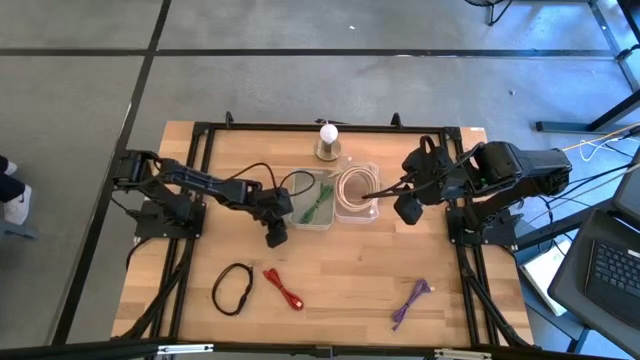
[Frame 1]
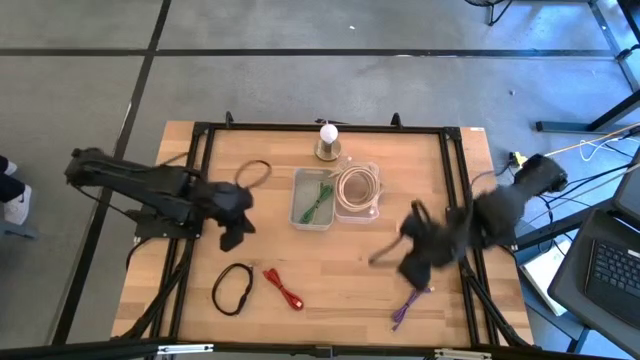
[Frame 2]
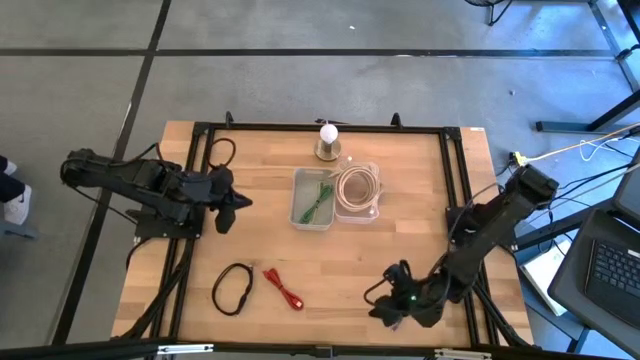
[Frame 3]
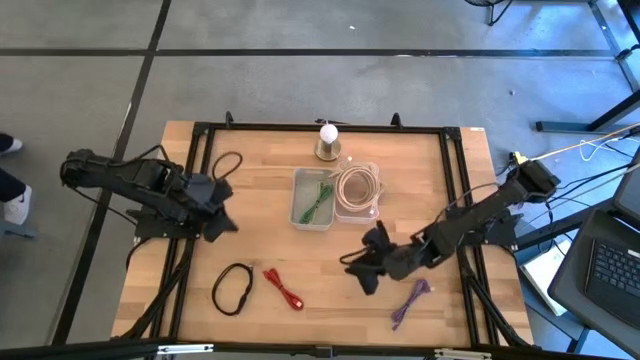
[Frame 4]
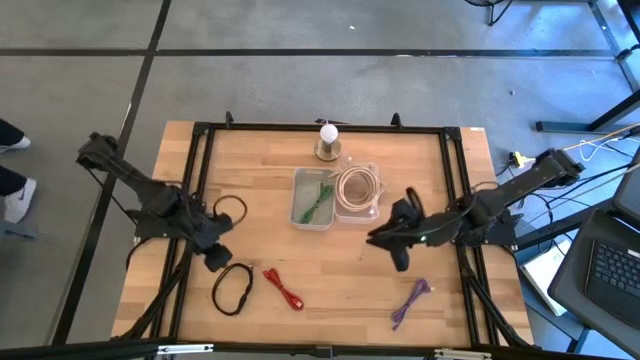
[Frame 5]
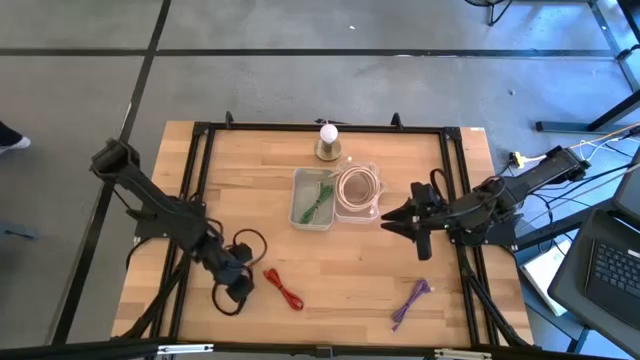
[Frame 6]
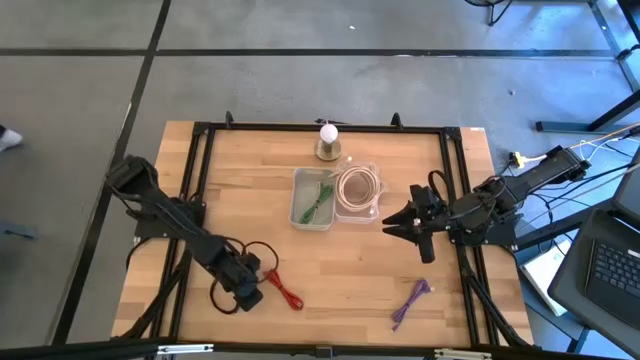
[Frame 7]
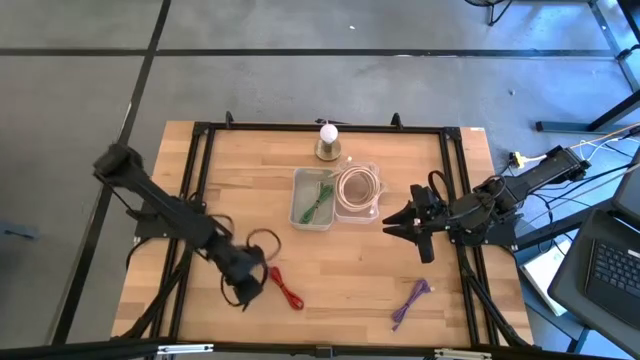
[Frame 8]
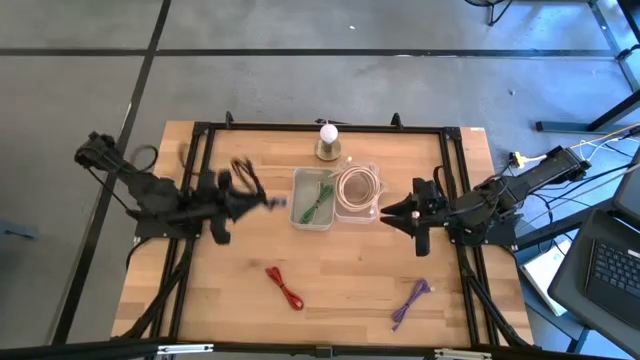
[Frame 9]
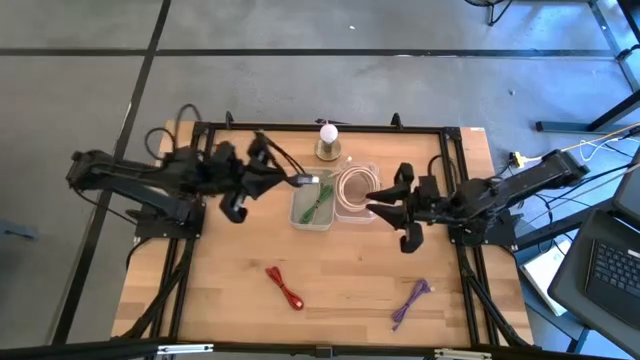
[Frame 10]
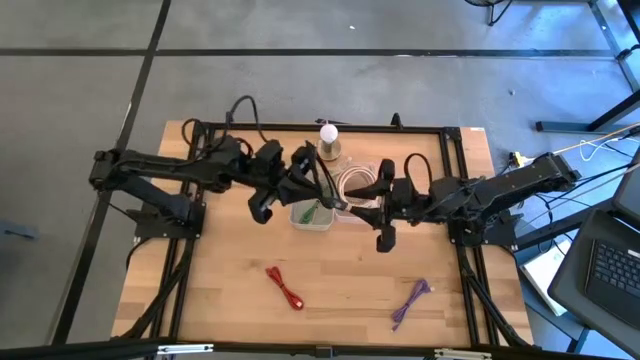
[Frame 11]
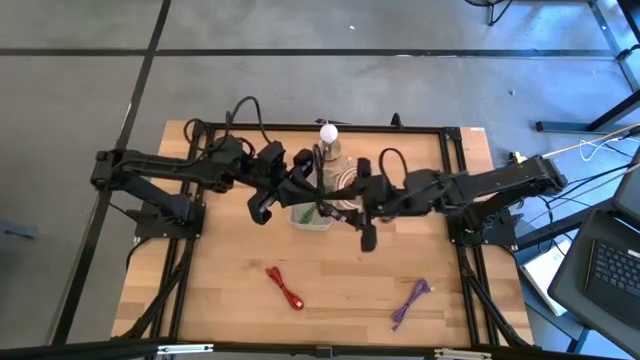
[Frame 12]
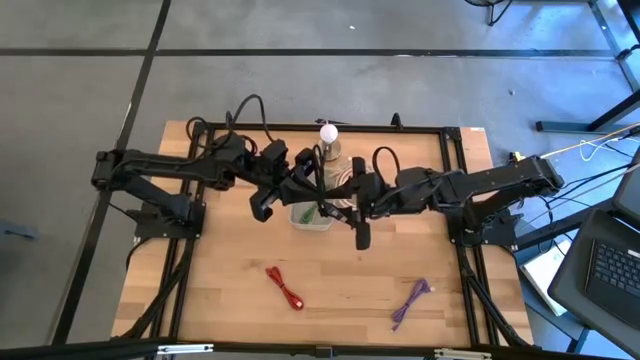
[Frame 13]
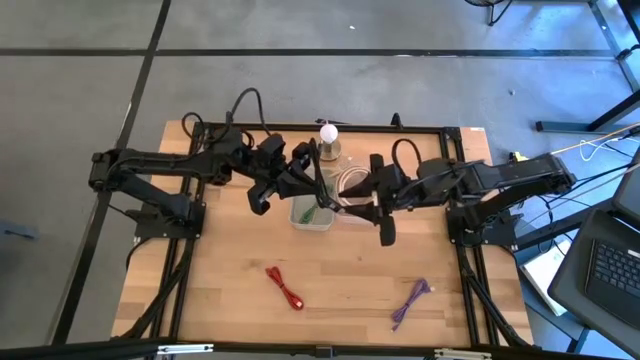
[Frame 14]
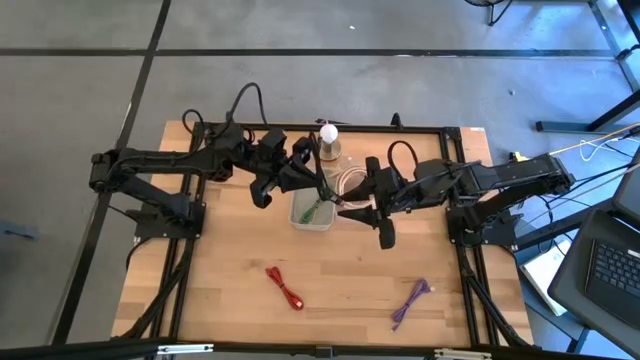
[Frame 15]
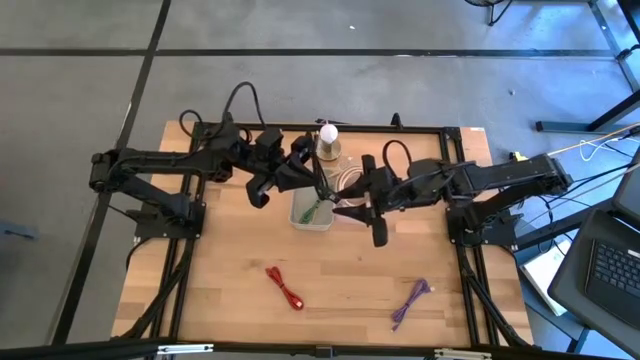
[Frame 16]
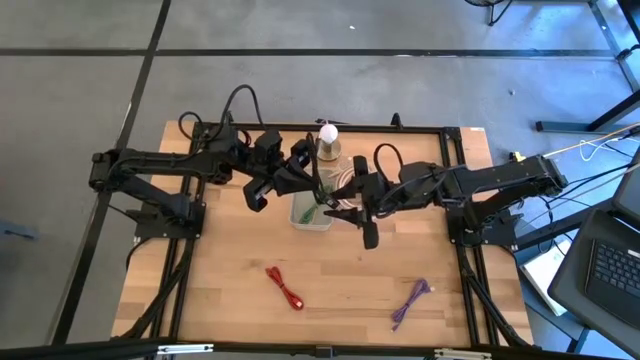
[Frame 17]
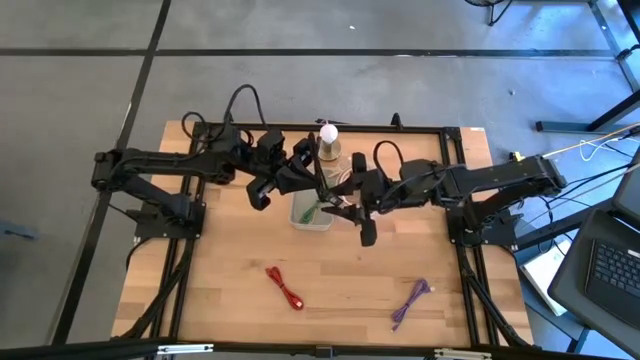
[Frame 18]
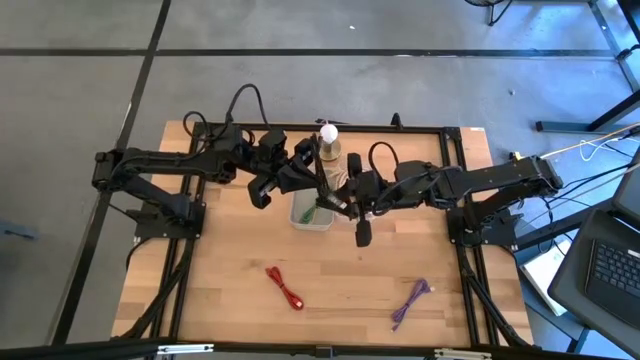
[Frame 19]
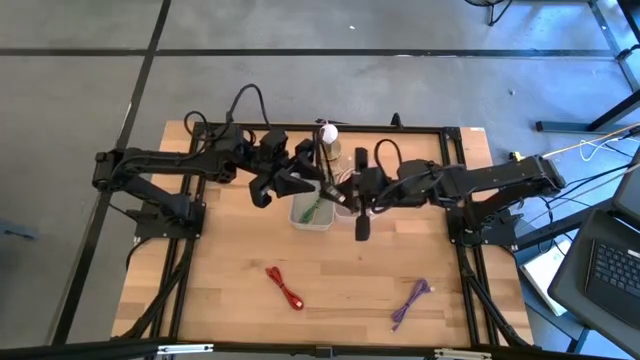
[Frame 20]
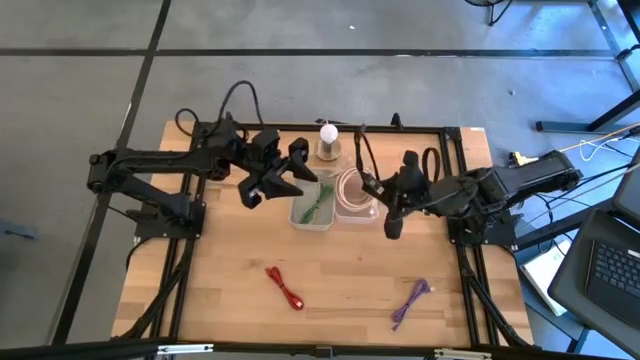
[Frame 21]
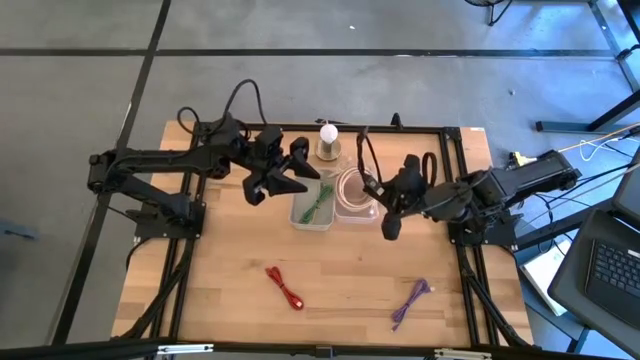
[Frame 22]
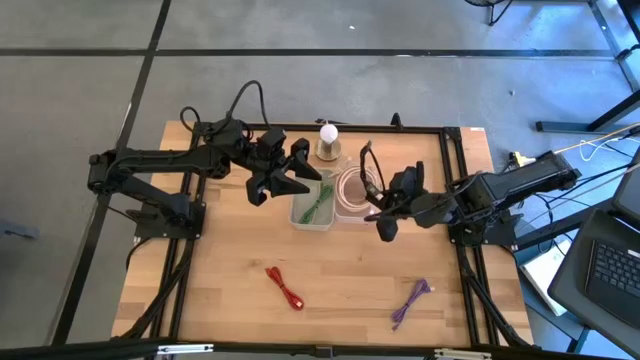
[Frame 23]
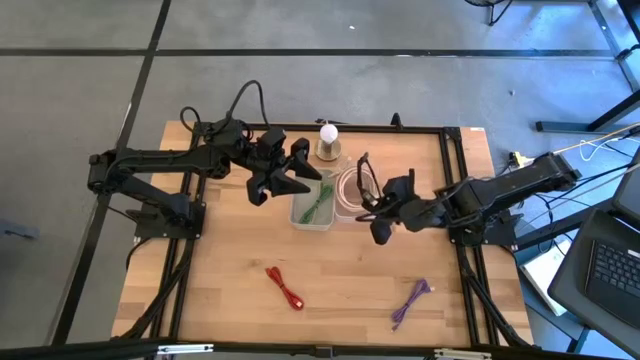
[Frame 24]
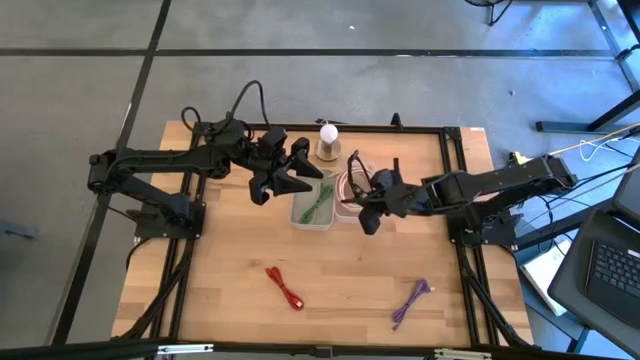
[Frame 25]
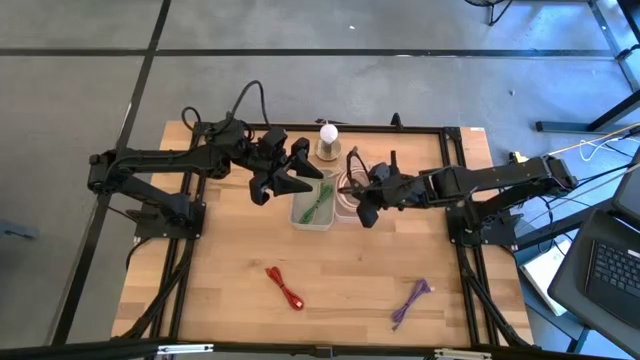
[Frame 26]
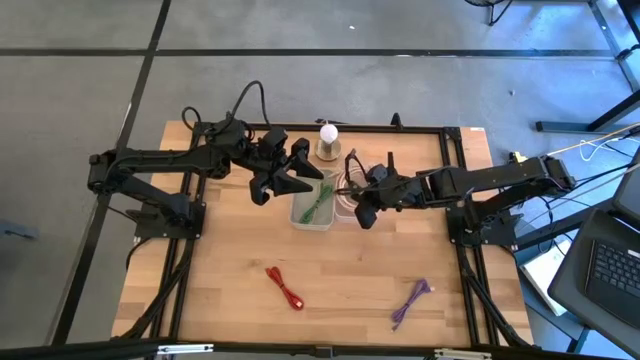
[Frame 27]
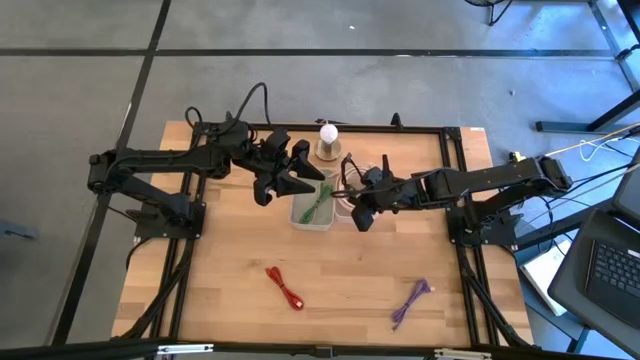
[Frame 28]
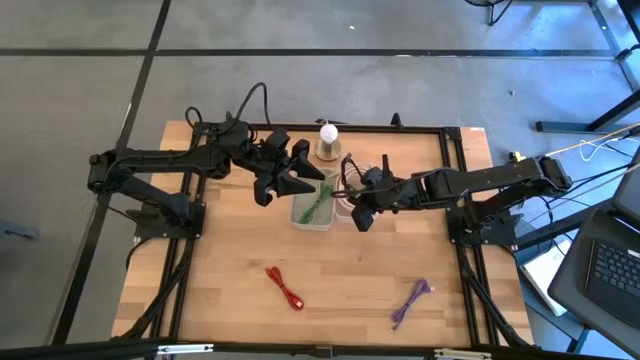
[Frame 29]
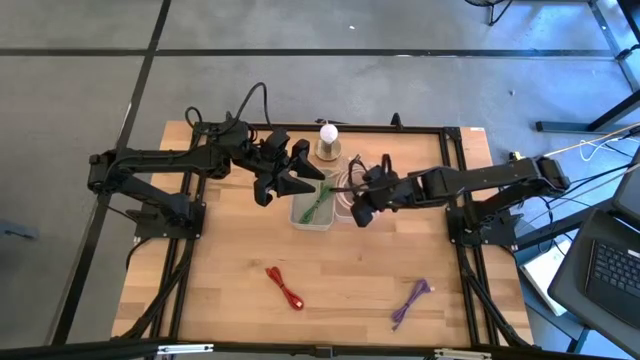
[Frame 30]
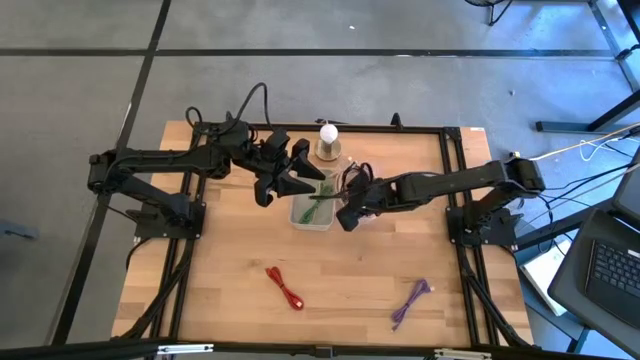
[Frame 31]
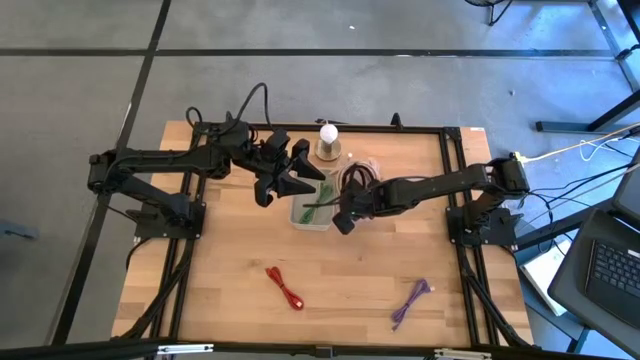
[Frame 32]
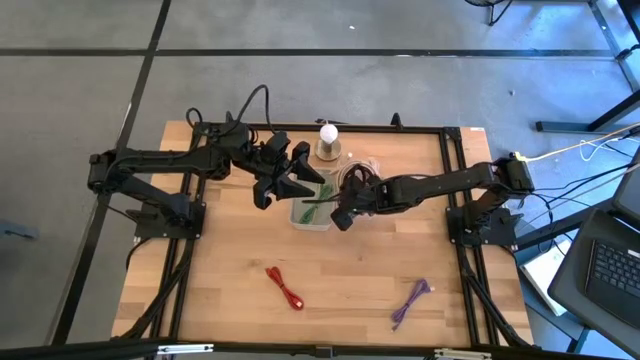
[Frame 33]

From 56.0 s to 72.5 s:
Task: Pick and place USB-C Cables
Put the black usb cable into the transparent bin

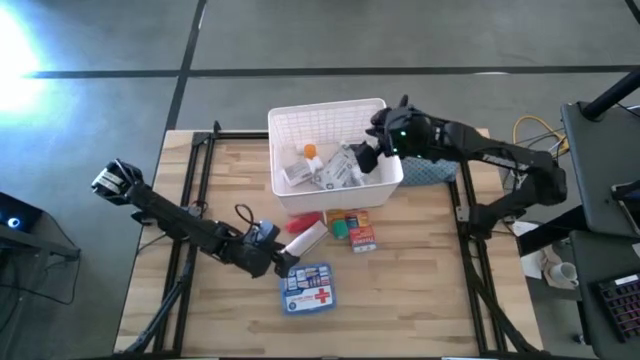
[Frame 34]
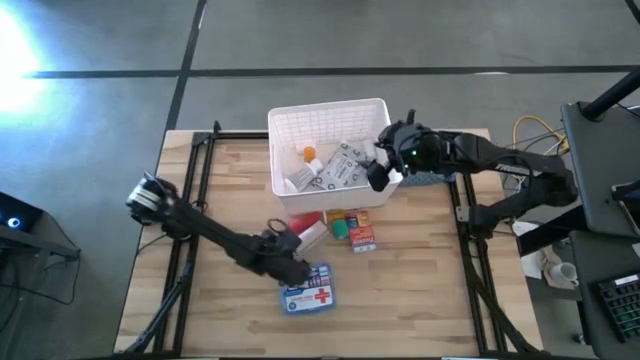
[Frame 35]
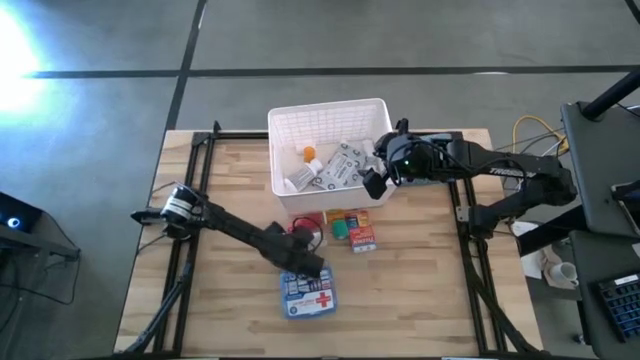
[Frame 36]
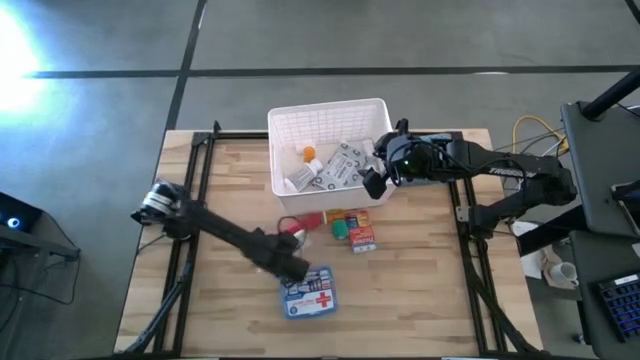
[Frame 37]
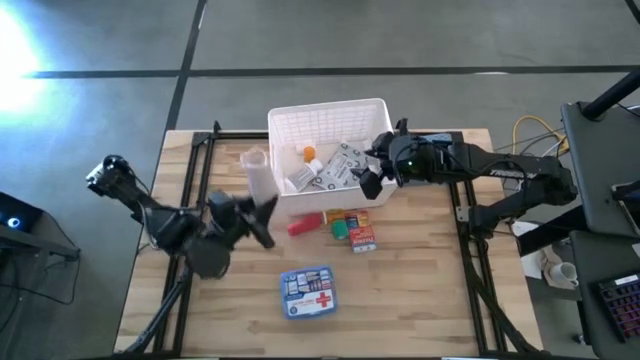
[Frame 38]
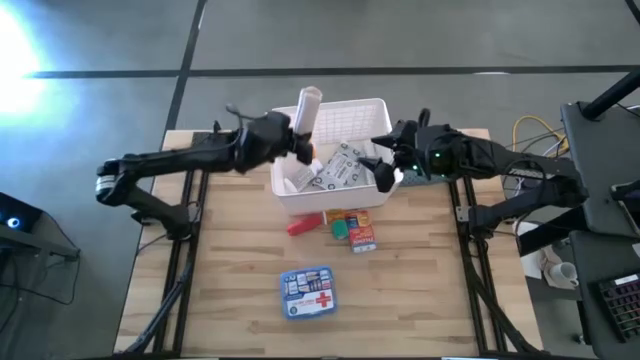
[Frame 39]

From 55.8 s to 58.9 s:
Task: Pick & place medical supplies in basket/bin
Put the white rolled bandage into the white container

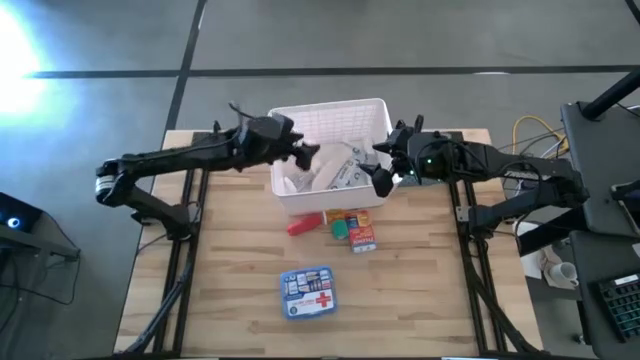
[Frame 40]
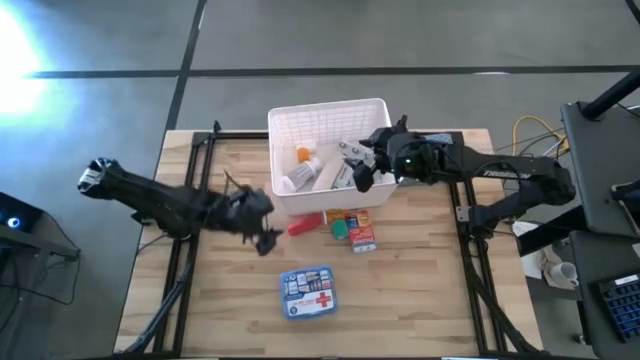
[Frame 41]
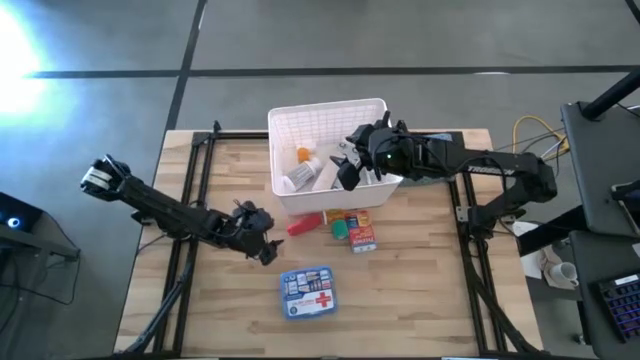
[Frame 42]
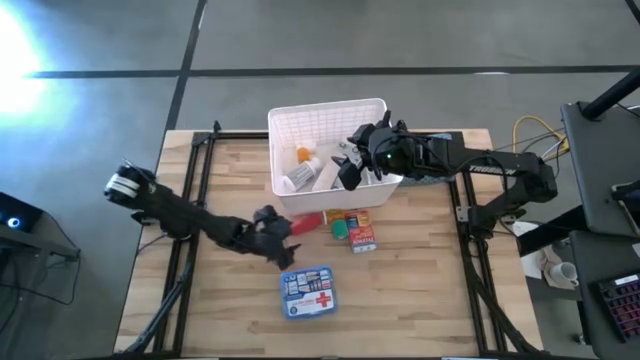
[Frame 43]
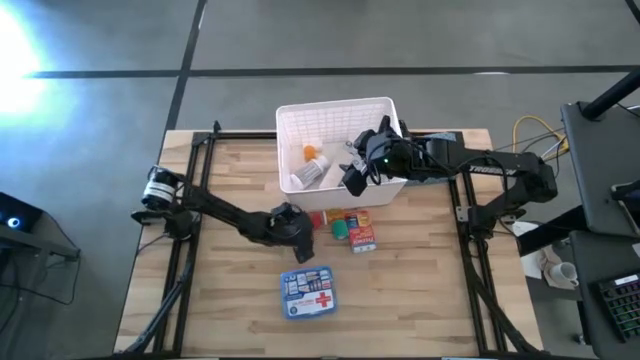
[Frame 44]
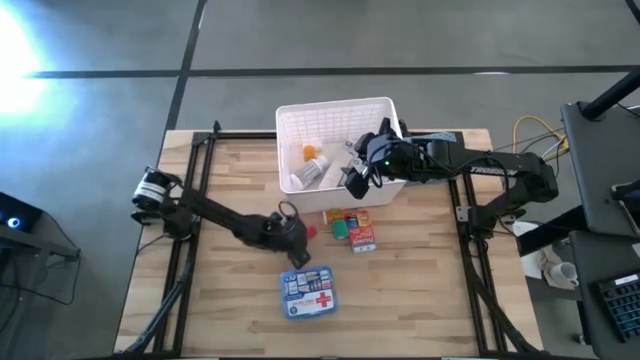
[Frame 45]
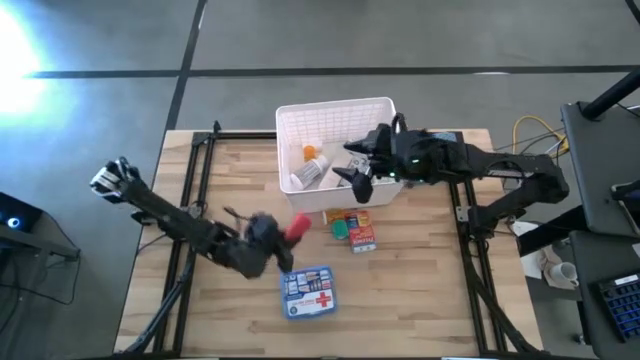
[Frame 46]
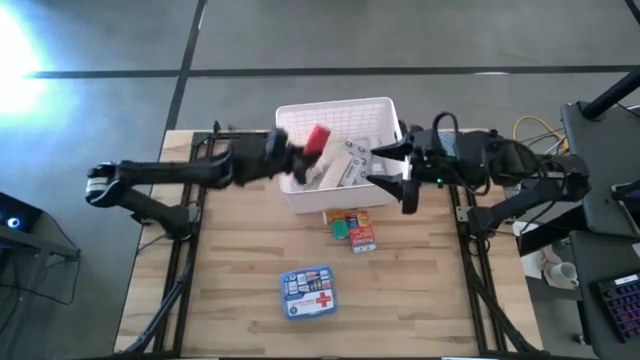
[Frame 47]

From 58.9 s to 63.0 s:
Put the red rolled bandage into the white container
